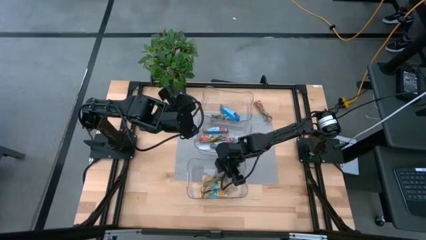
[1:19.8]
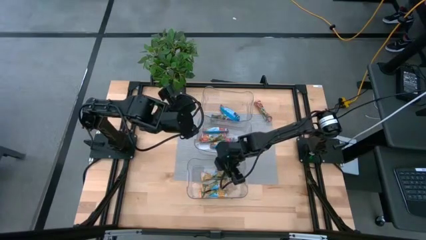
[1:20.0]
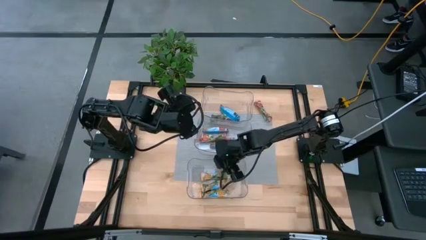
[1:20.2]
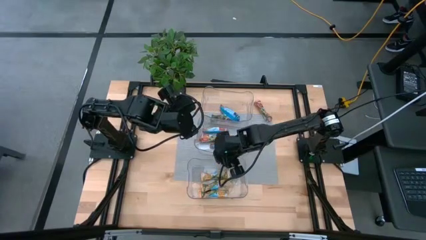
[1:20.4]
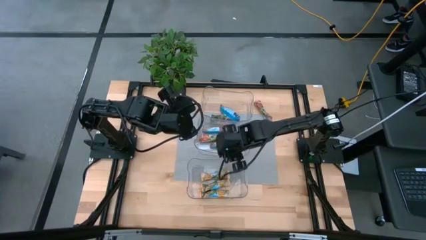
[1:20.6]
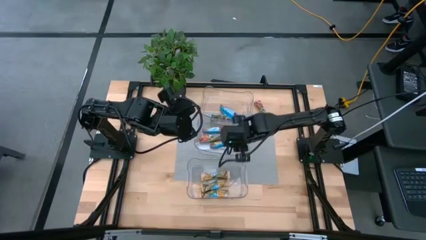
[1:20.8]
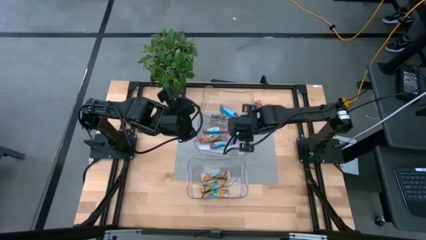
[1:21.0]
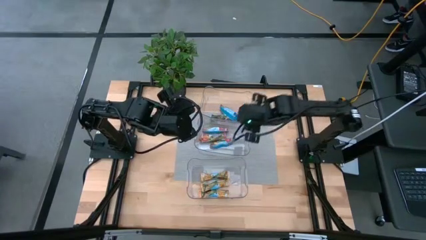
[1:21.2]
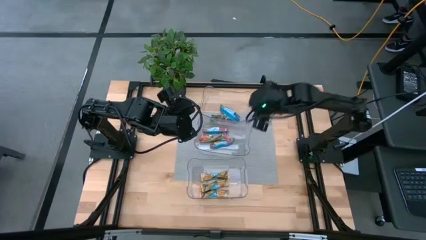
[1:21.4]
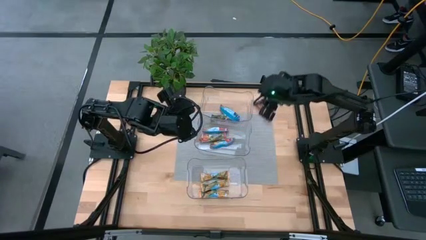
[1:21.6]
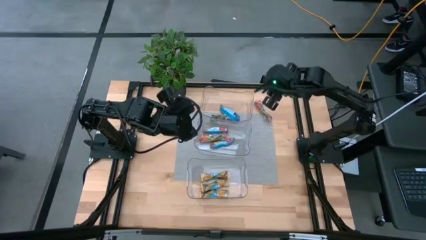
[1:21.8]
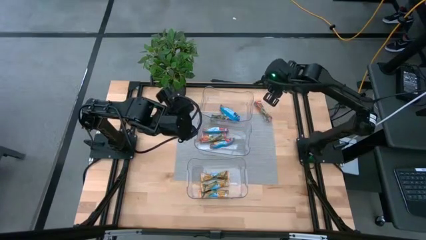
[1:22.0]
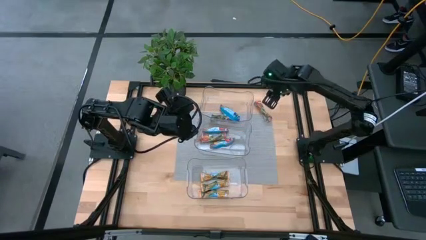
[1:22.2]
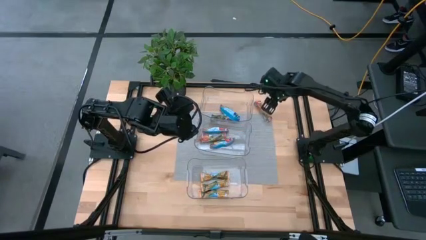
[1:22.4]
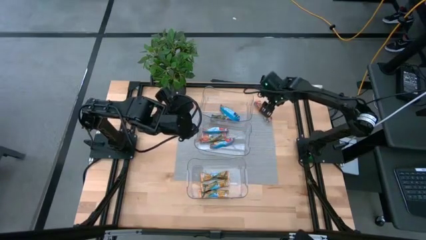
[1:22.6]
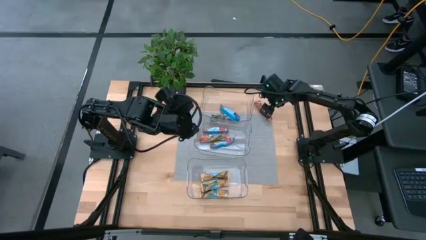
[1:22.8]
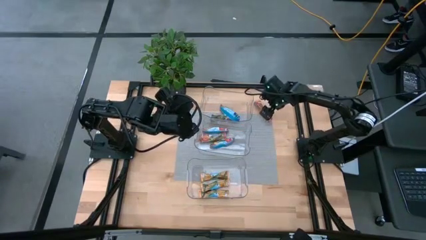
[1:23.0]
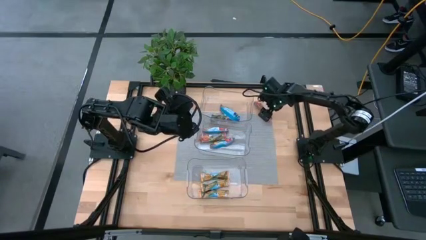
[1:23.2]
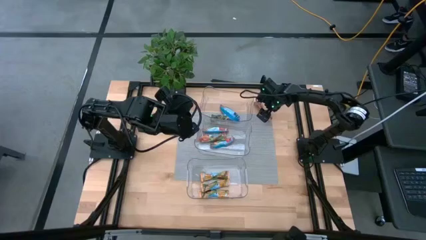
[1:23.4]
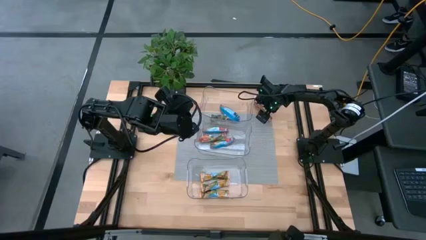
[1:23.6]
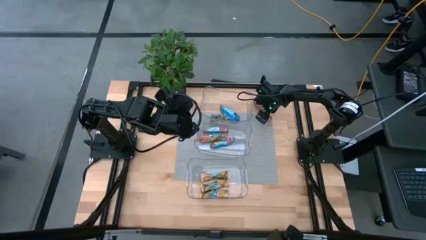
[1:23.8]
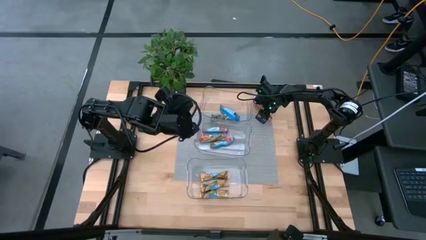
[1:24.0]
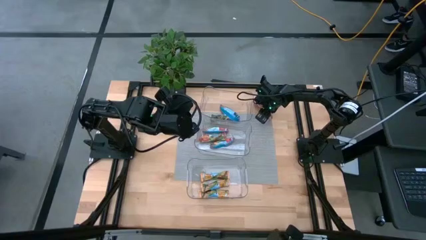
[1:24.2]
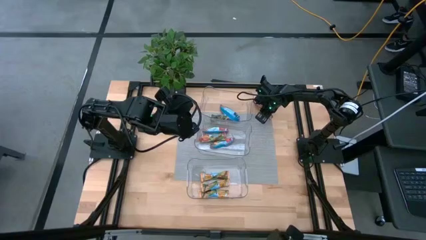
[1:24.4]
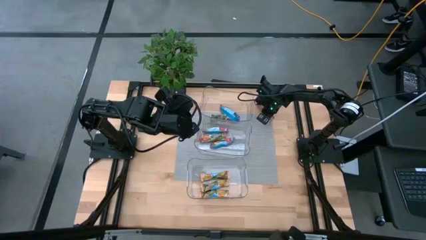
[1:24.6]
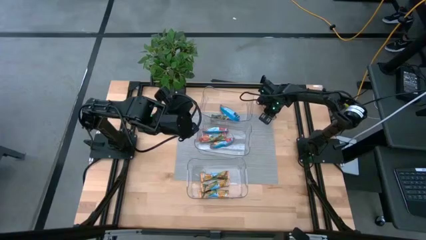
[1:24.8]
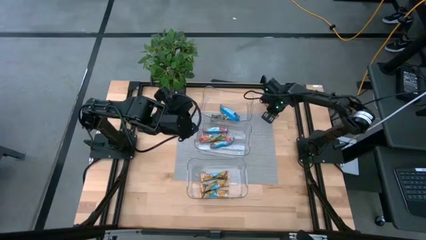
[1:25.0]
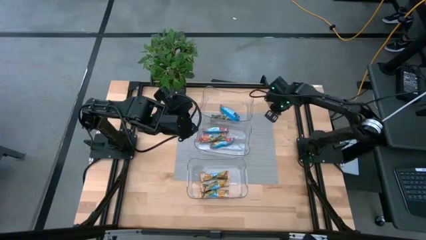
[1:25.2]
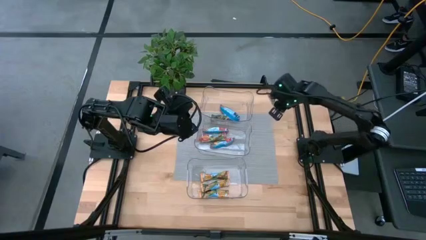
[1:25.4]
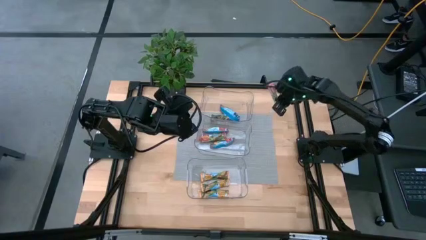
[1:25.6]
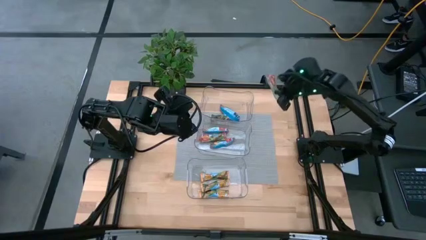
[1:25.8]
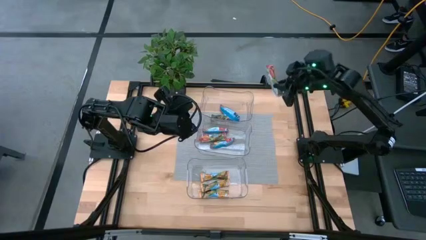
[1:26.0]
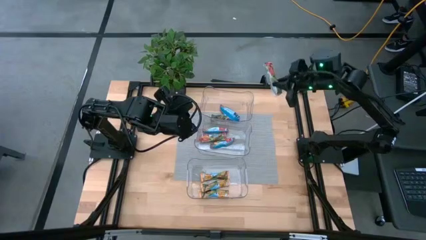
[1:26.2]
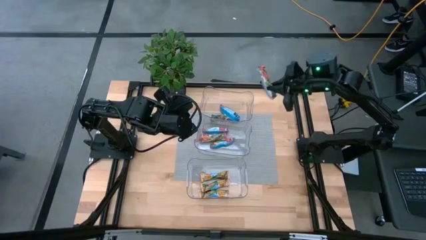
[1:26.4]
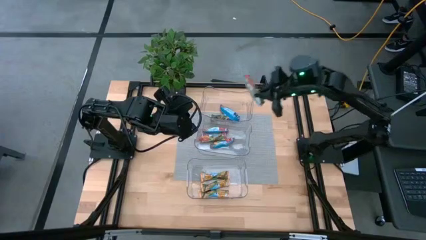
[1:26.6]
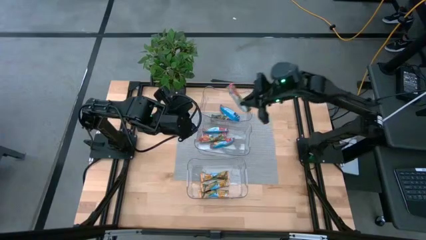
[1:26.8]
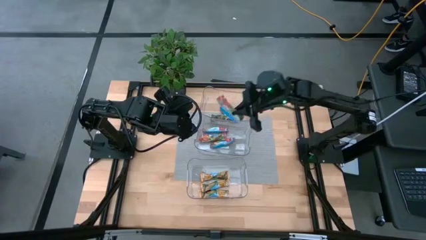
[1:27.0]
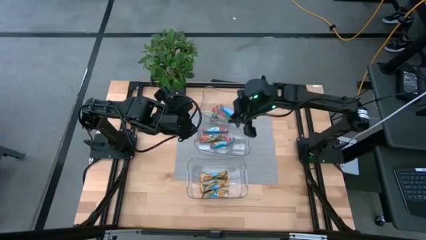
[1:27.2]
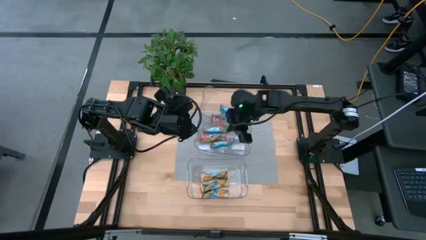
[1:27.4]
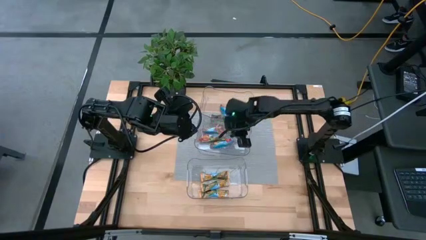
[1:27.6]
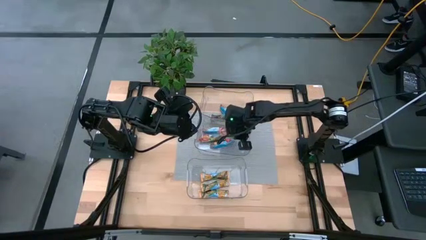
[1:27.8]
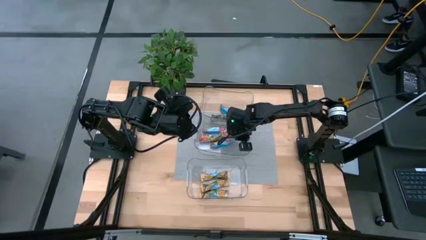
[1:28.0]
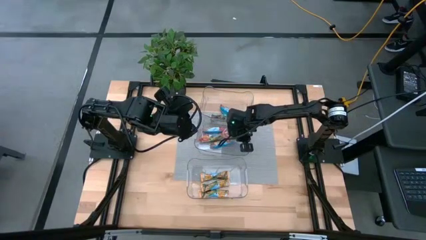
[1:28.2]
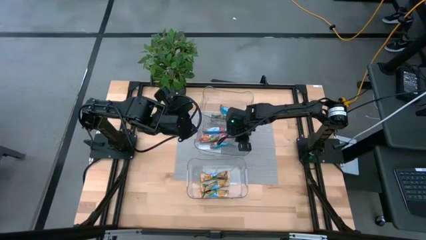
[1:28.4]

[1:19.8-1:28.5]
Task: Pick and place Granola Bars by type
Put the red granola bar into the middle transparent bin

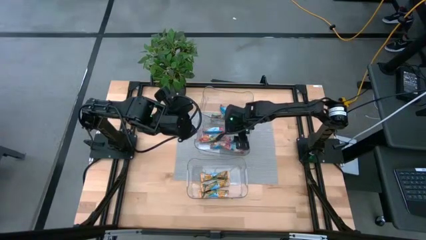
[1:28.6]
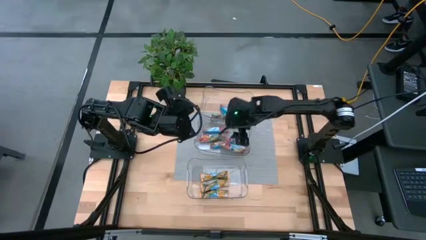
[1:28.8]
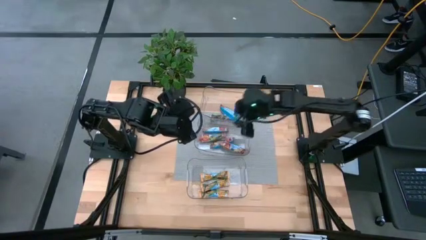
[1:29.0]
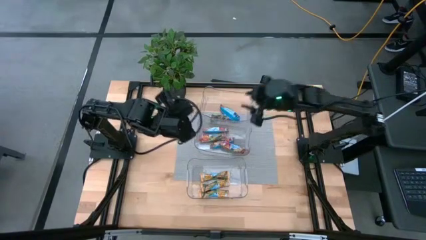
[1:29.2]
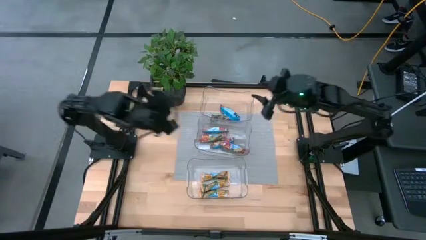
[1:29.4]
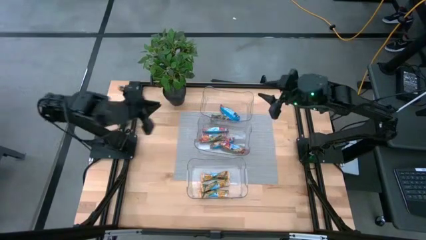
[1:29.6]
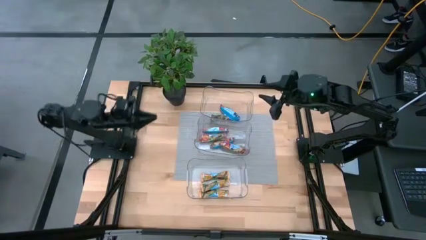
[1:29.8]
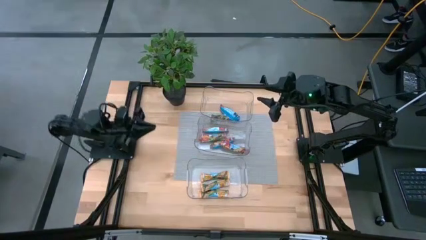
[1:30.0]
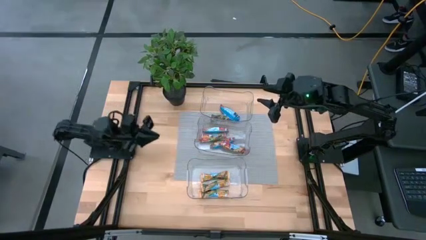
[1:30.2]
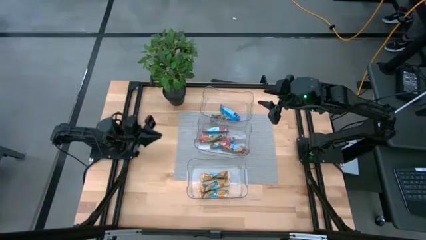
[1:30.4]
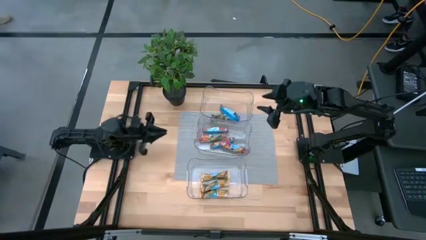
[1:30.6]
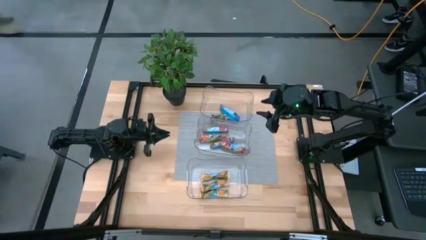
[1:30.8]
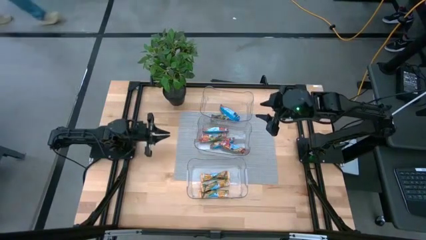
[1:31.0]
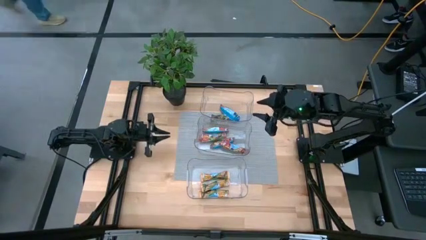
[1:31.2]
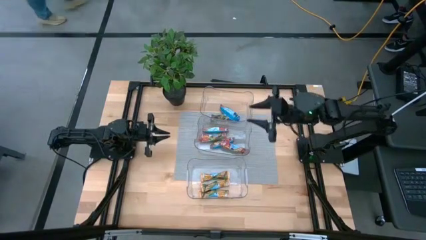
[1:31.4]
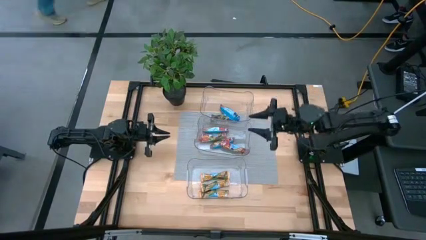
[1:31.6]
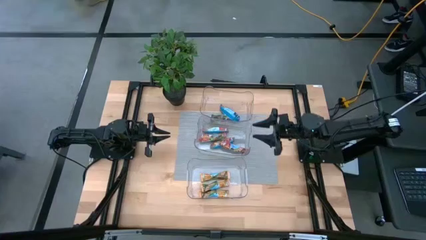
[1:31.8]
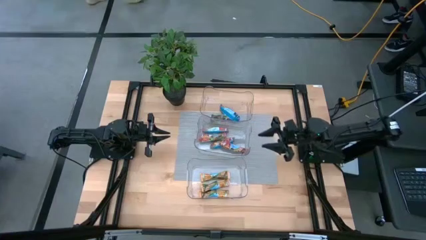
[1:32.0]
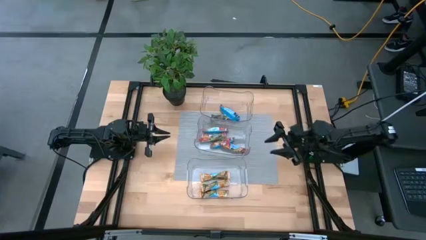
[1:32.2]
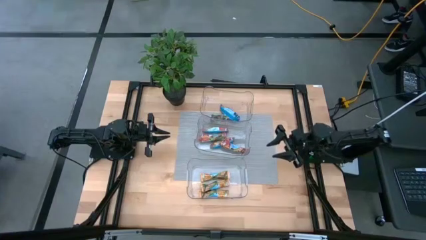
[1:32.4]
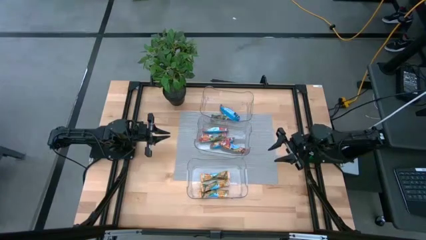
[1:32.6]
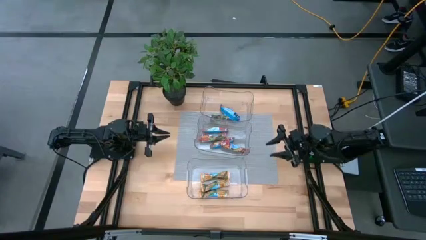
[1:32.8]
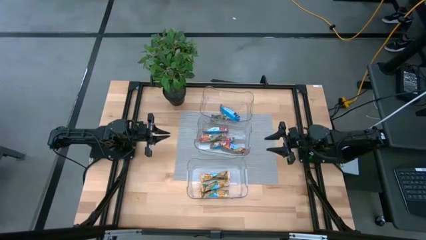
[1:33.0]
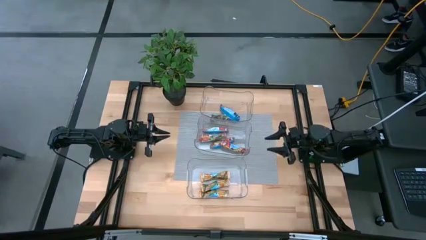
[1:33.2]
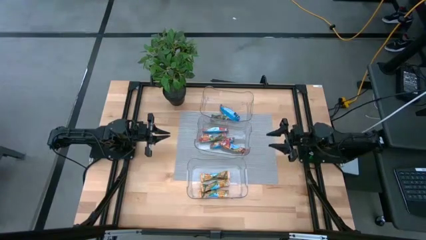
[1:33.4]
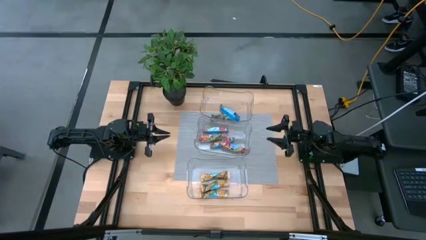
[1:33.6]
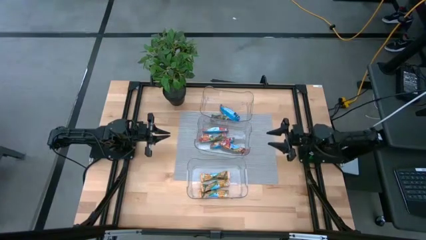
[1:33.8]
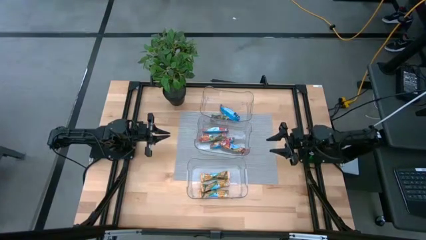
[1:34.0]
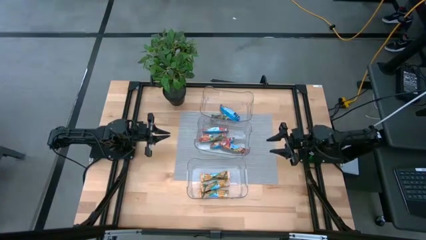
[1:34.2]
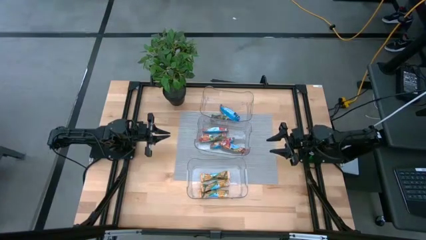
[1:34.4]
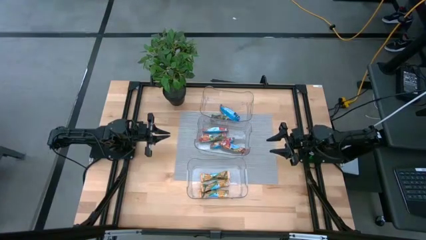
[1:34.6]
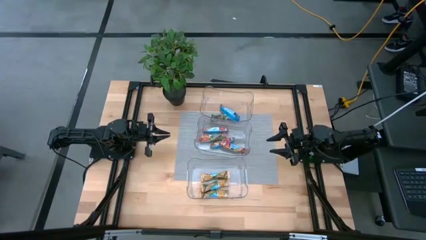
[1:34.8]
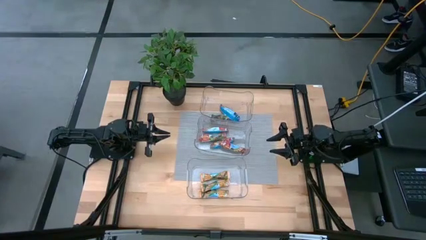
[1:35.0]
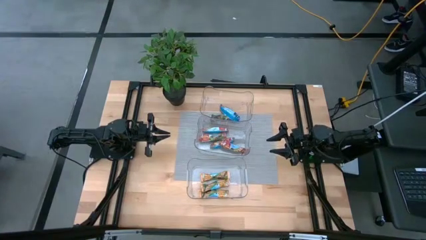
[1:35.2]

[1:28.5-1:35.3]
Return to Home Position
